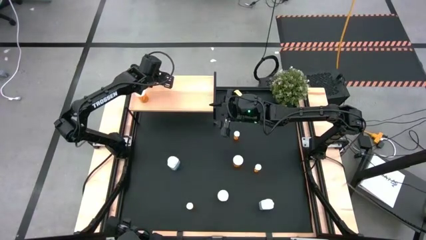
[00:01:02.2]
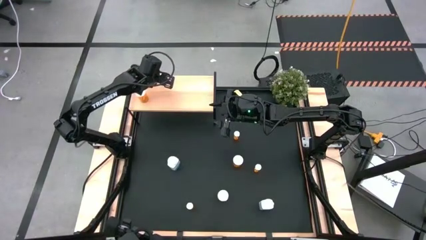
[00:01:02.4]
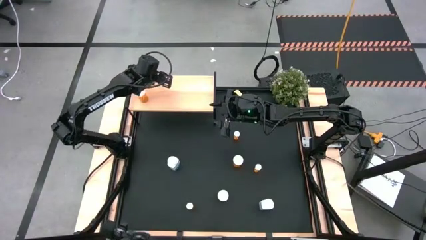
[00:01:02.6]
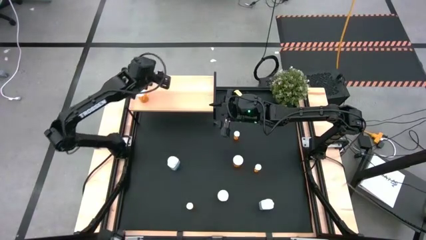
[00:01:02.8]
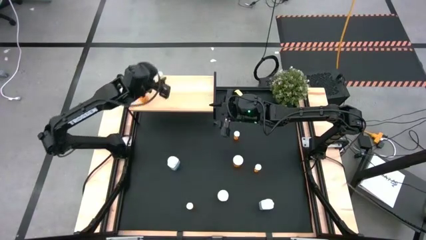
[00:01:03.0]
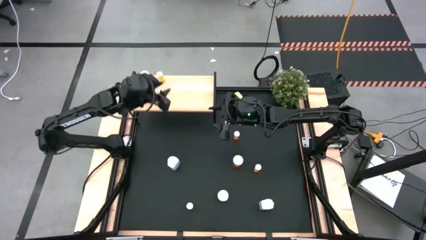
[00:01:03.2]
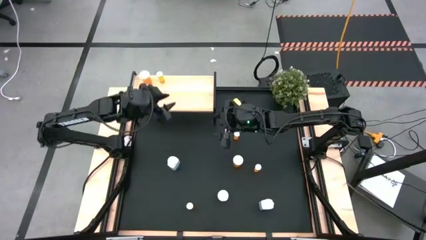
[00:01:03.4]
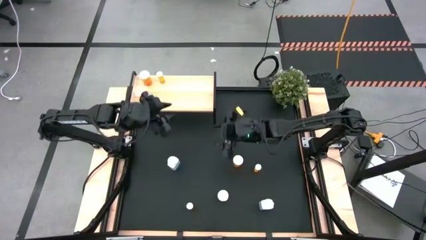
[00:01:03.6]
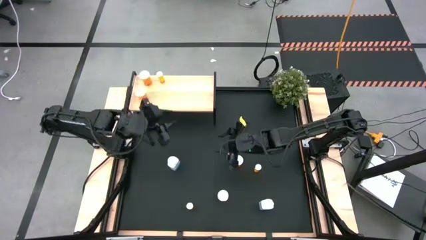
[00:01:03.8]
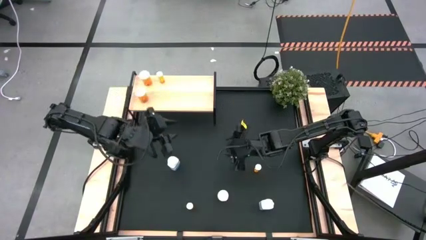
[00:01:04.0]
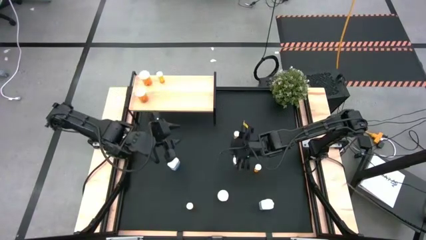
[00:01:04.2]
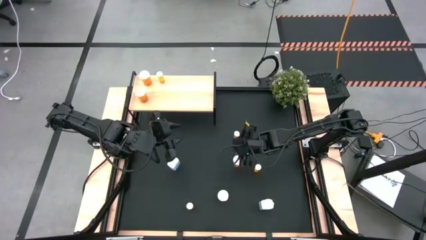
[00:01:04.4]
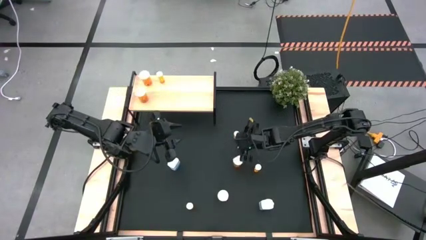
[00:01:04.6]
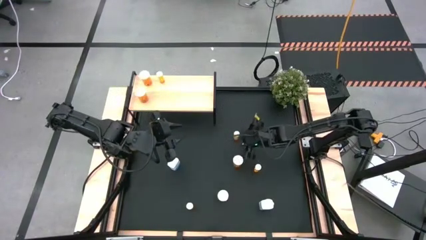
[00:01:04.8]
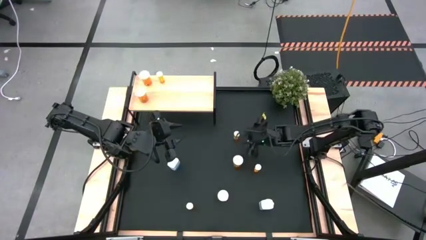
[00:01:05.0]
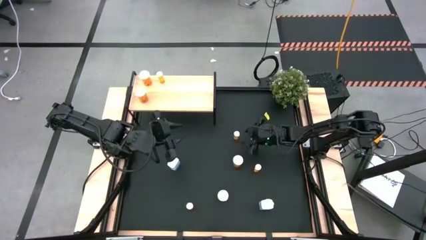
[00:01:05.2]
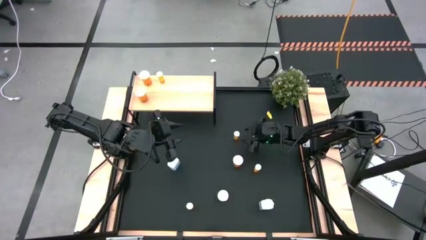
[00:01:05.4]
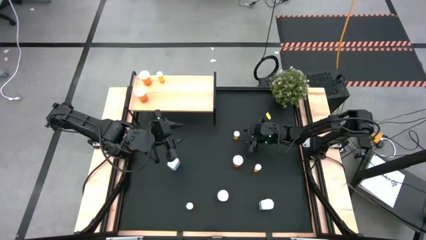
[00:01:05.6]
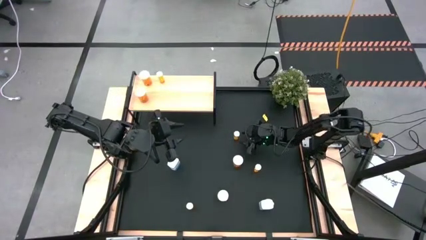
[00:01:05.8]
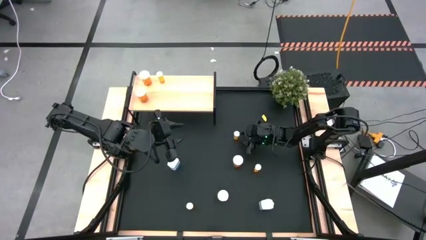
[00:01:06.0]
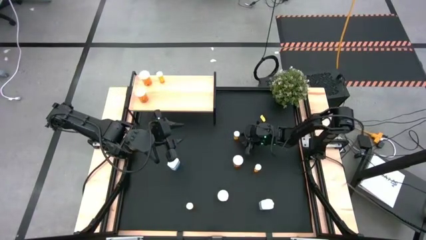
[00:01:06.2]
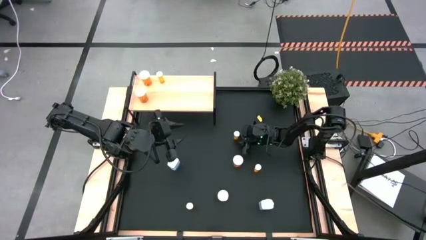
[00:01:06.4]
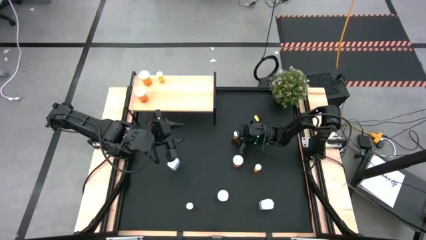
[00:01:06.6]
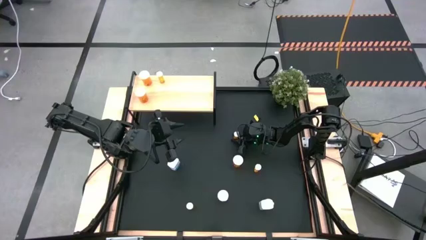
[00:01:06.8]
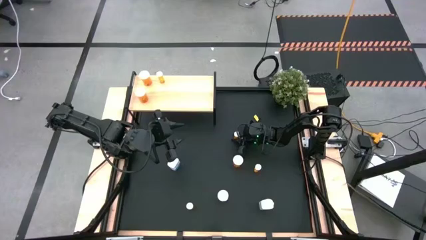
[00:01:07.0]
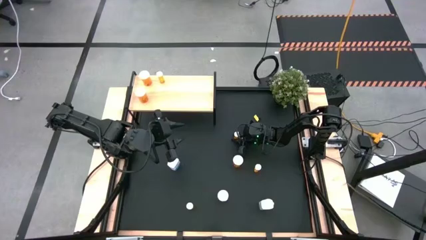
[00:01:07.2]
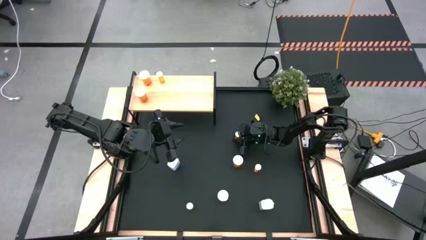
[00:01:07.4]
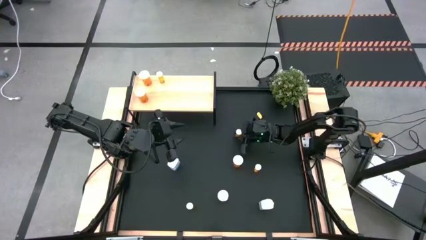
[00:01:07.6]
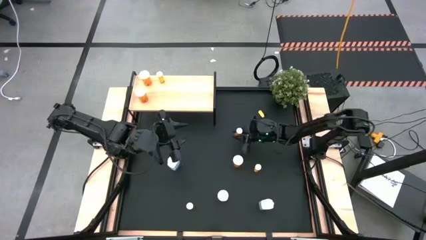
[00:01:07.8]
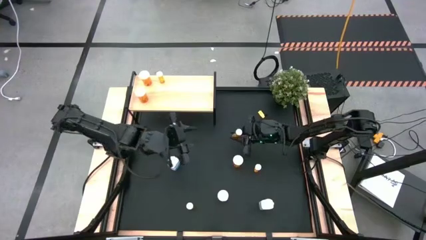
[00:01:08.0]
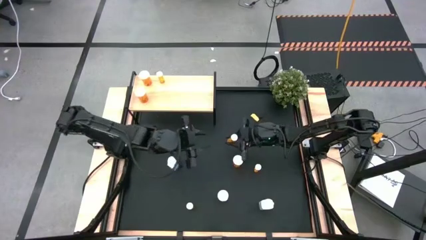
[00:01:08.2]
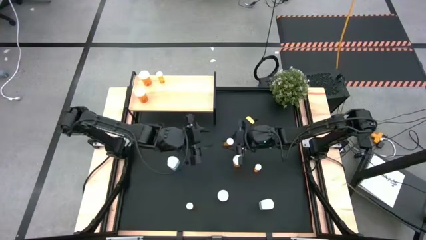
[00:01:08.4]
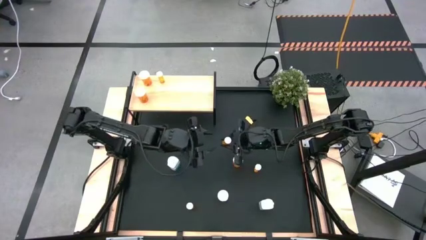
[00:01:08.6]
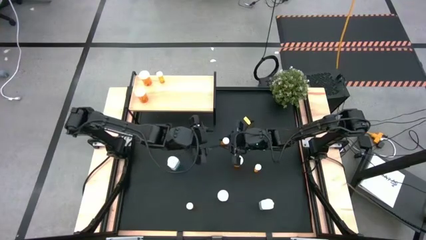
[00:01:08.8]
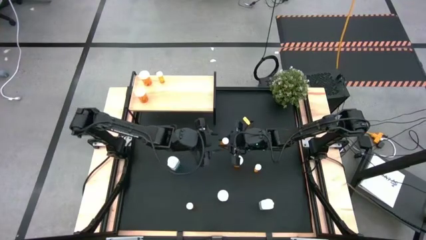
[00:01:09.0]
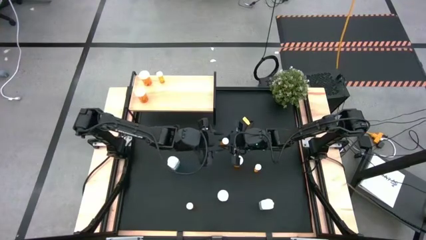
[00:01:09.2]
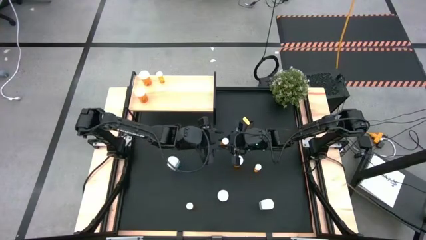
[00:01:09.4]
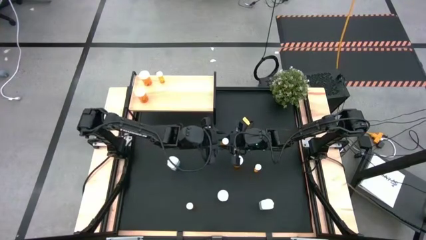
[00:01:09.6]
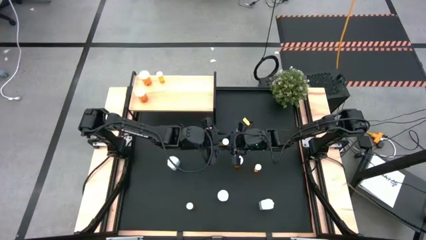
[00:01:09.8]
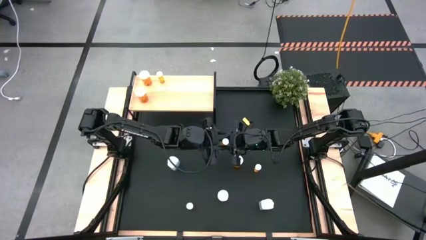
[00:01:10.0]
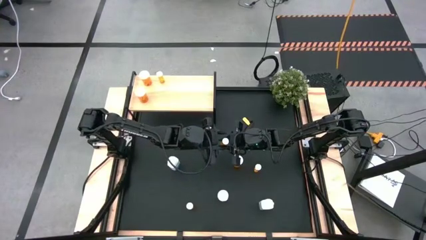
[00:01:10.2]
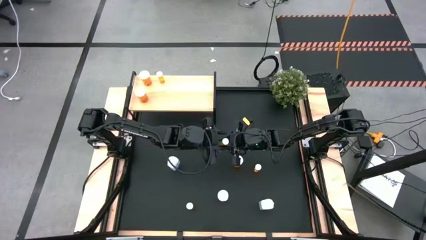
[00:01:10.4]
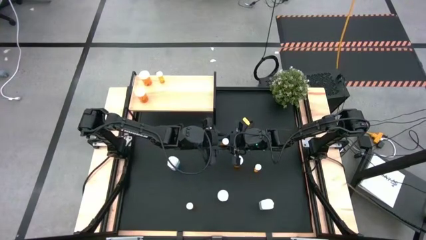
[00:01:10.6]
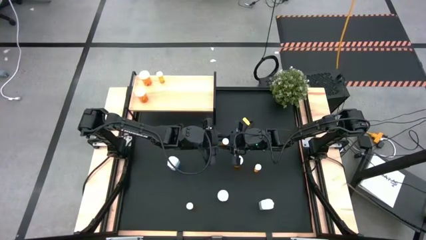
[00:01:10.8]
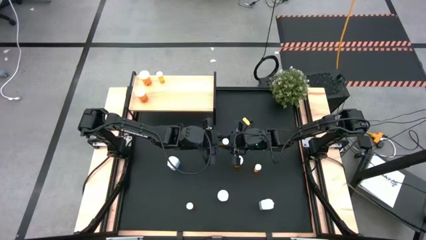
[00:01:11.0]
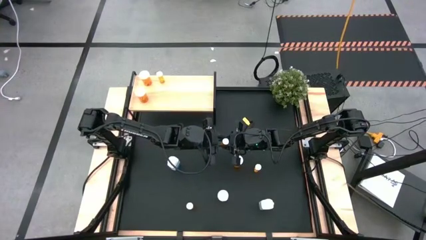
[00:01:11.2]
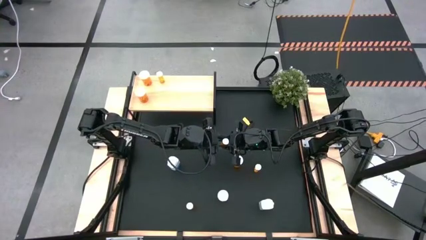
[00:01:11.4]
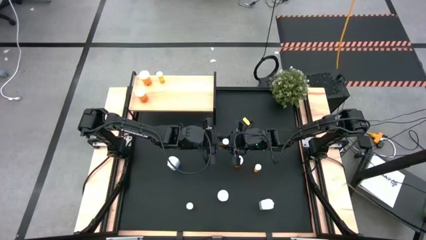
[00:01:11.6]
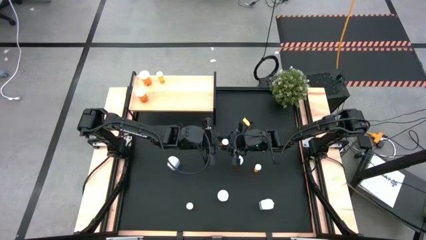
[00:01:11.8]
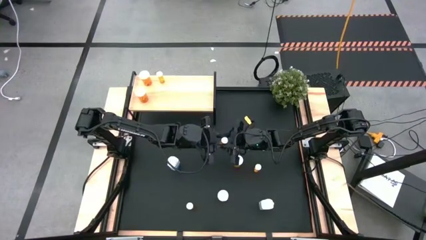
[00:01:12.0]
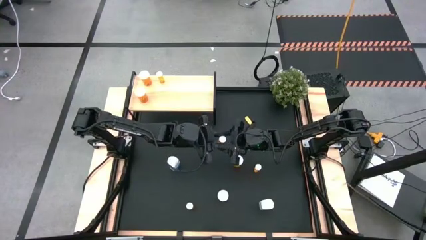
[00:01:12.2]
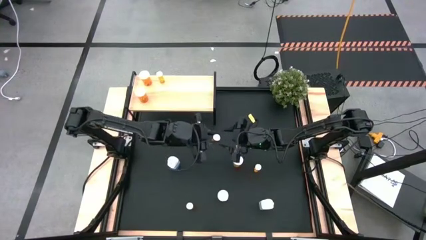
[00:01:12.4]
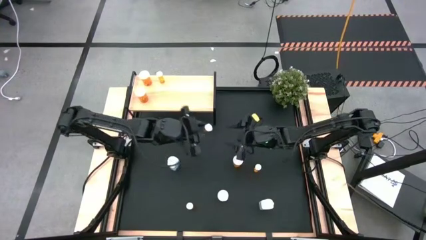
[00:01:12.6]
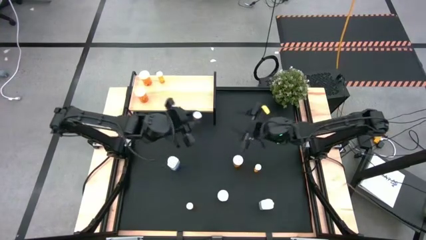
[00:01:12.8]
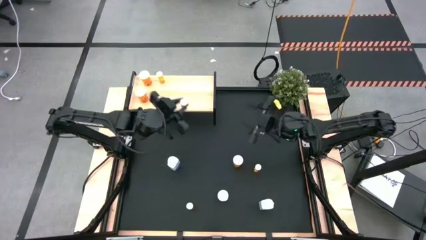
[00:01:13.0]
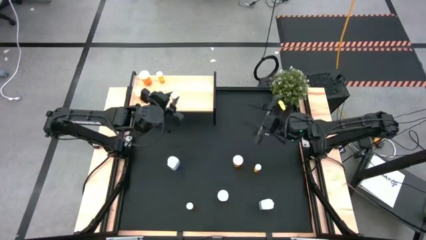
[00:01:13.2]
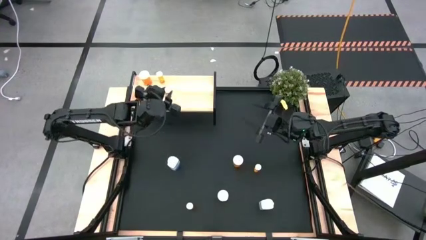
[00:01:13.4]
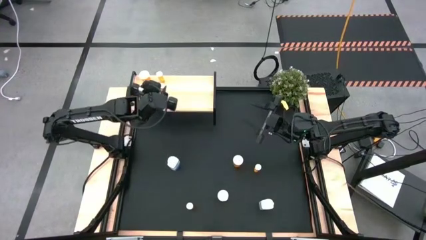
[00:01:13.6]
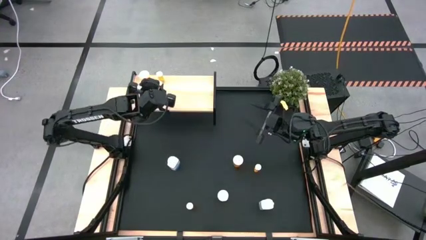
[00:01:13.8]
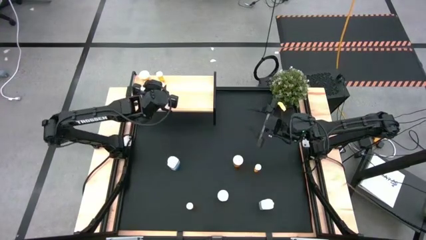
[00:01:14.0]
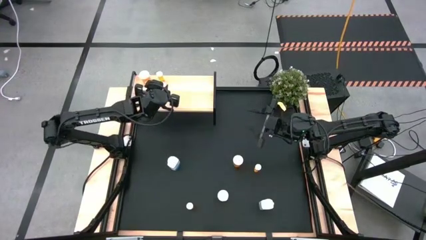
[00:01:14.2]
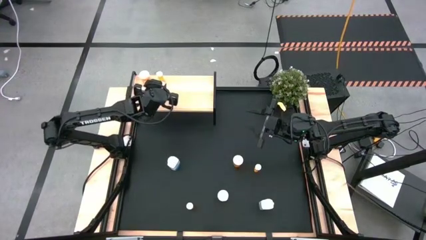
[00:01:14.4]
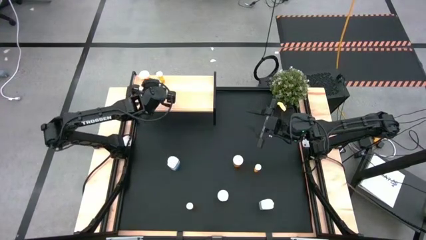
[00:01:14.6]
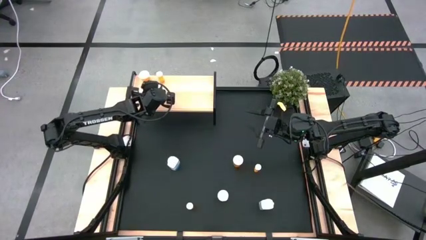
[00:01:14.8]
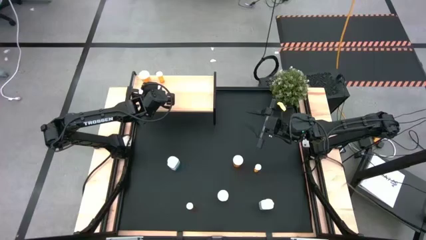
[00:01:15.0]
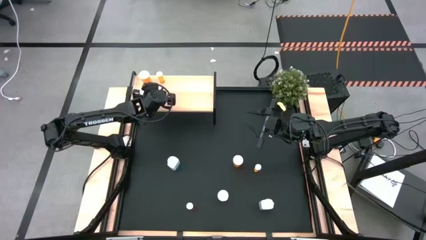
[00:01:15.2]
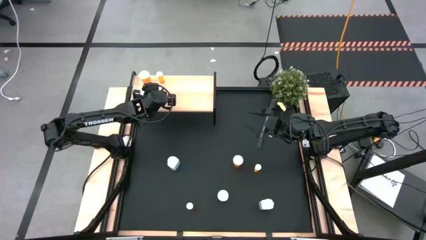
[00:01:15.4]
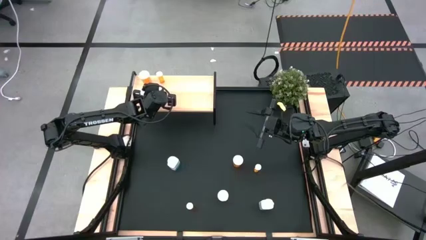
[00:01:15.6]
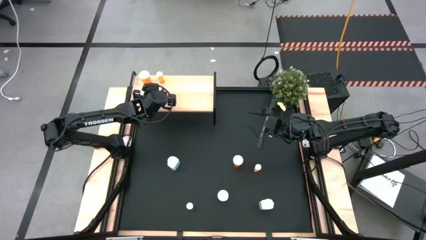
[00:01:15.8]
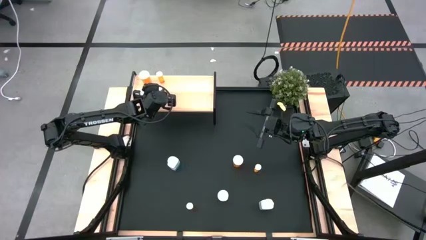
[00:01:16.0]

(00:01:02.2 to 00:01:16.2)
Task: Pick and place medicine bottles onto shelf by color
Put the small orange pill bottle on the shelf aligned with the other small orange pill bottle
